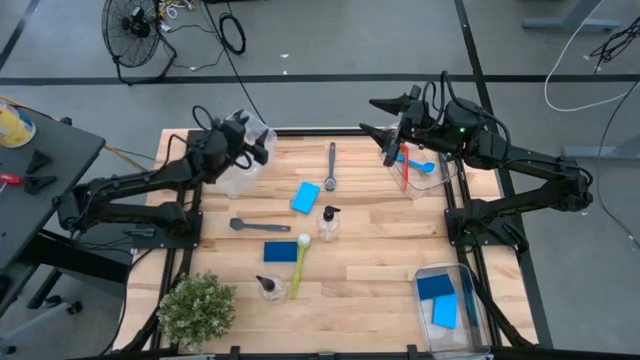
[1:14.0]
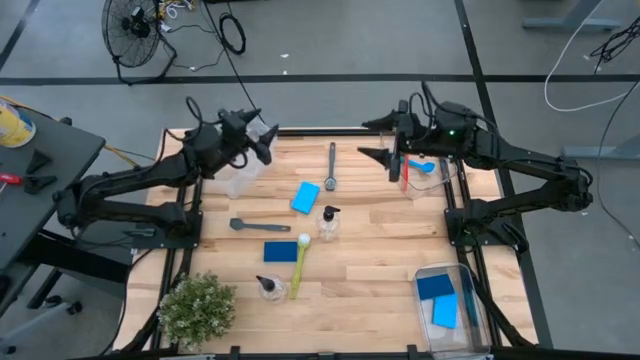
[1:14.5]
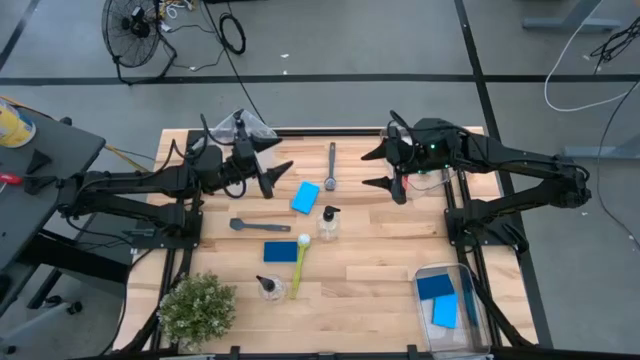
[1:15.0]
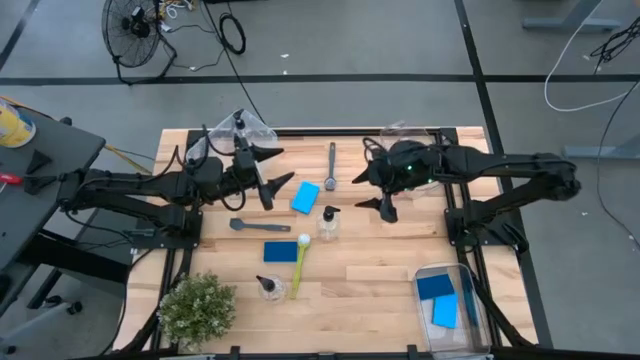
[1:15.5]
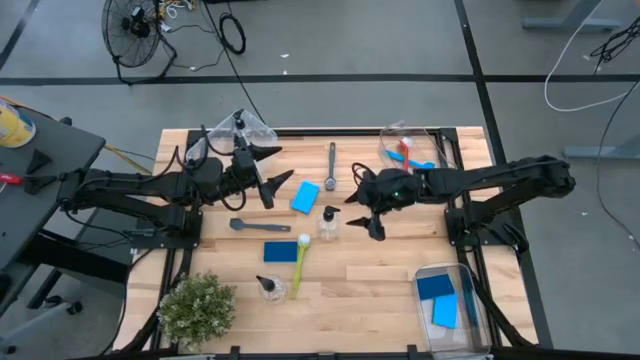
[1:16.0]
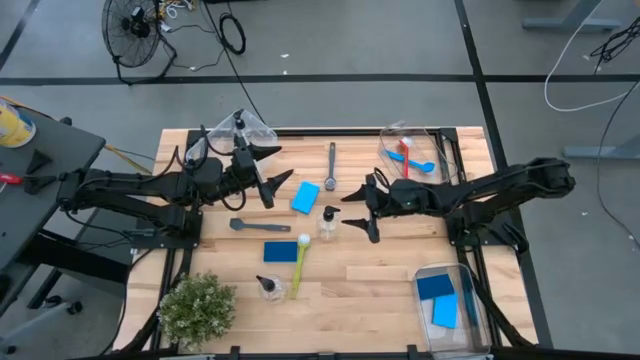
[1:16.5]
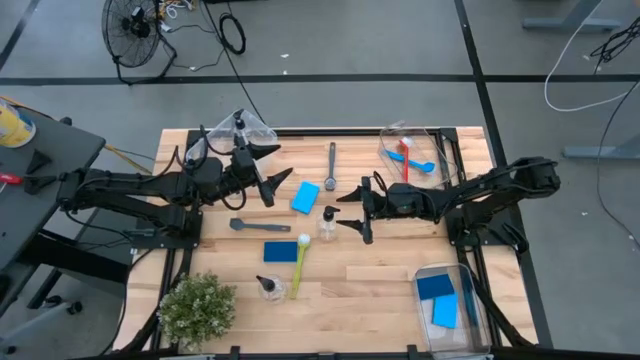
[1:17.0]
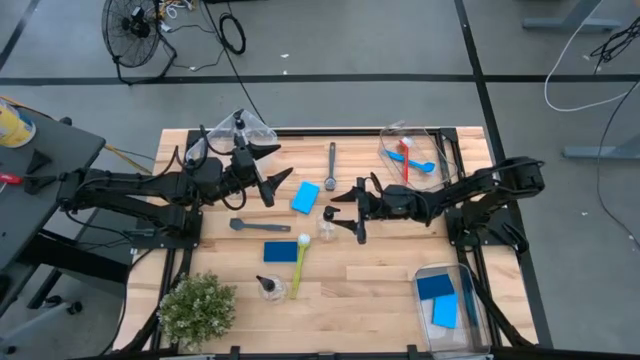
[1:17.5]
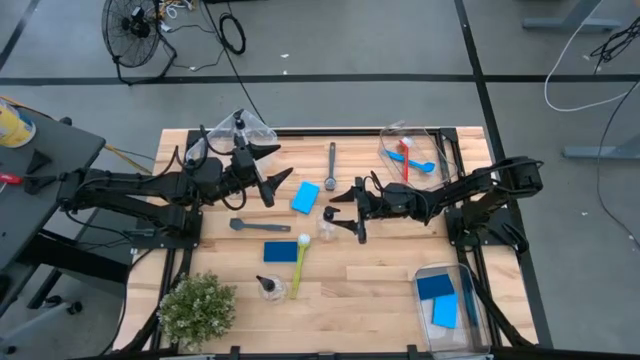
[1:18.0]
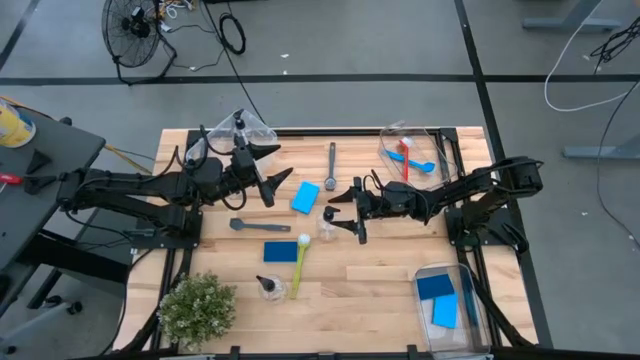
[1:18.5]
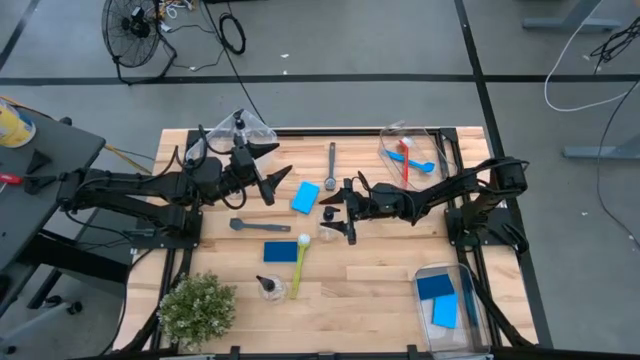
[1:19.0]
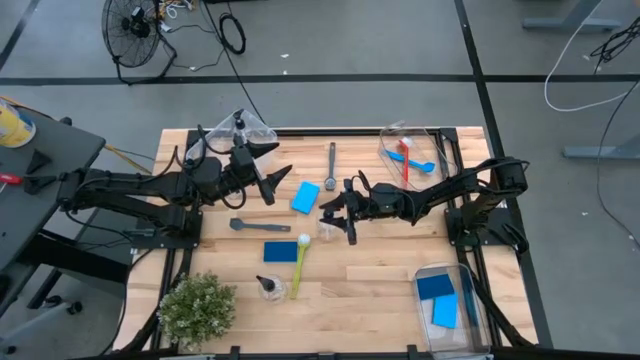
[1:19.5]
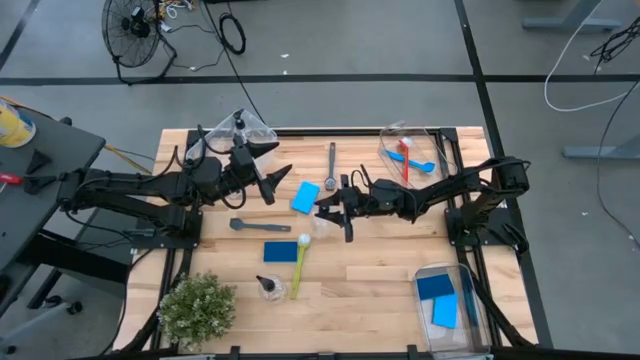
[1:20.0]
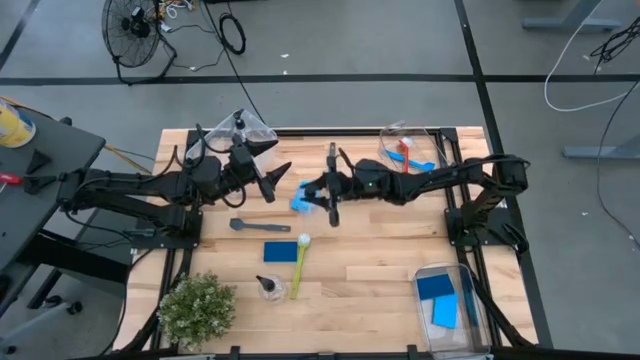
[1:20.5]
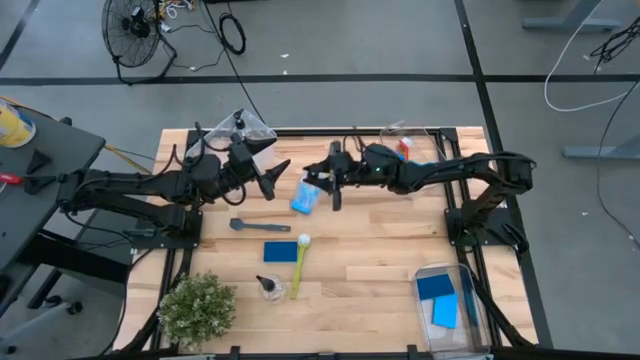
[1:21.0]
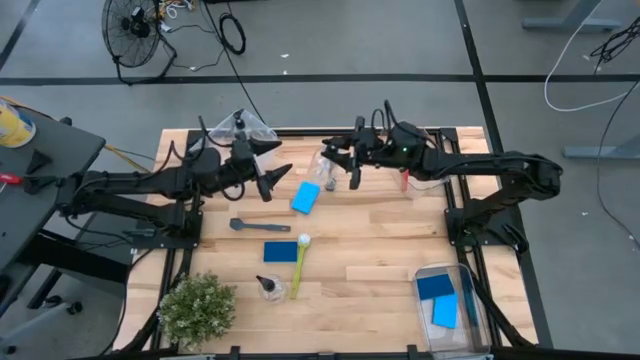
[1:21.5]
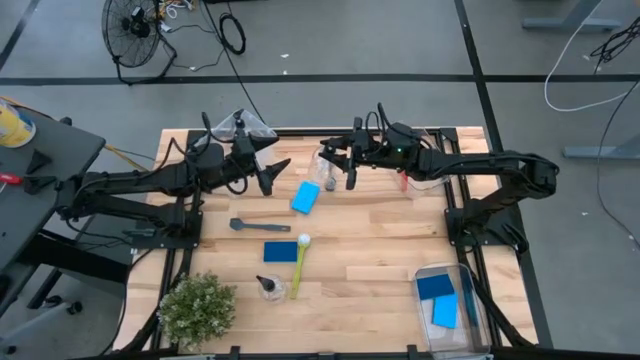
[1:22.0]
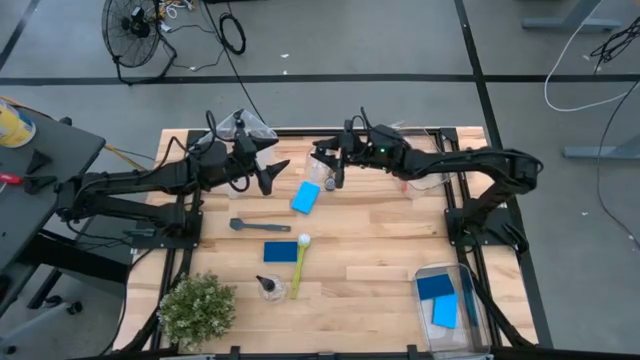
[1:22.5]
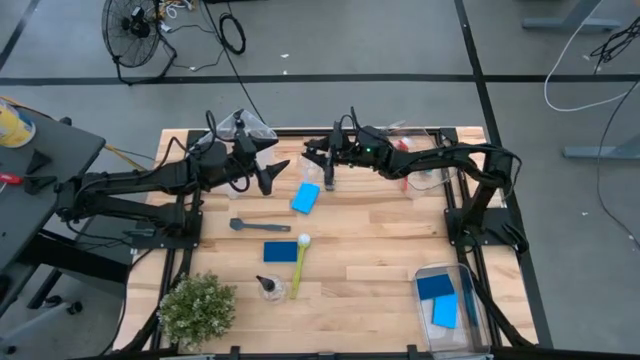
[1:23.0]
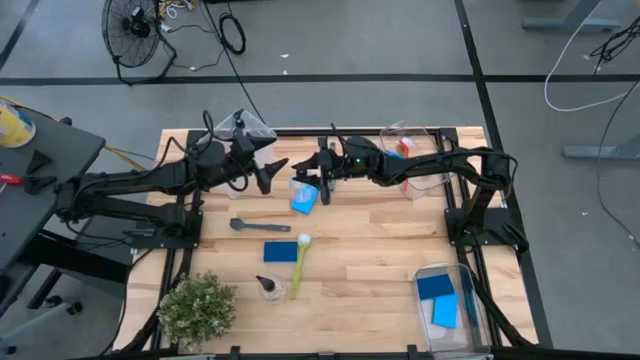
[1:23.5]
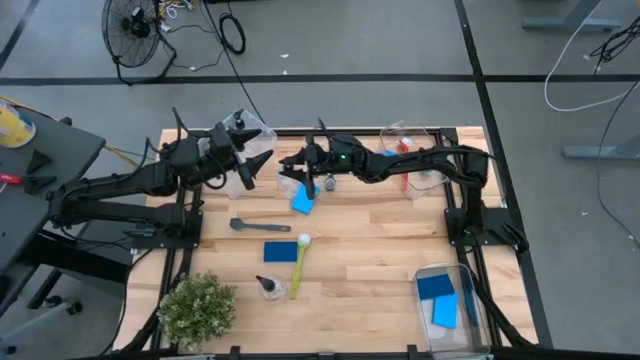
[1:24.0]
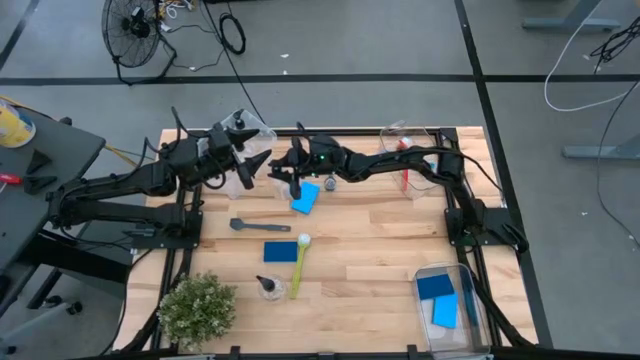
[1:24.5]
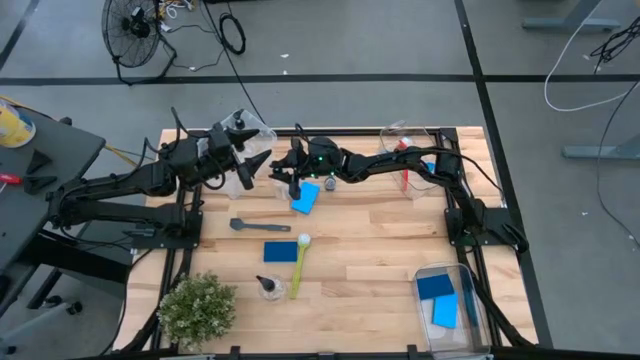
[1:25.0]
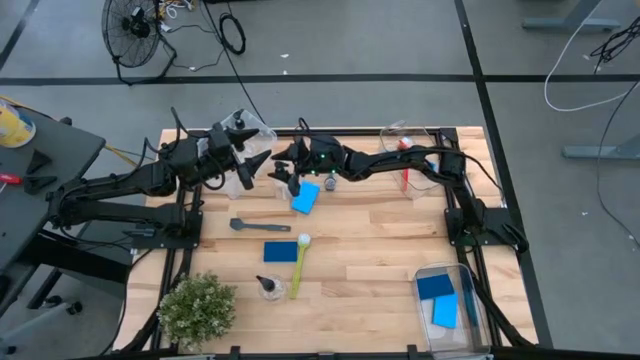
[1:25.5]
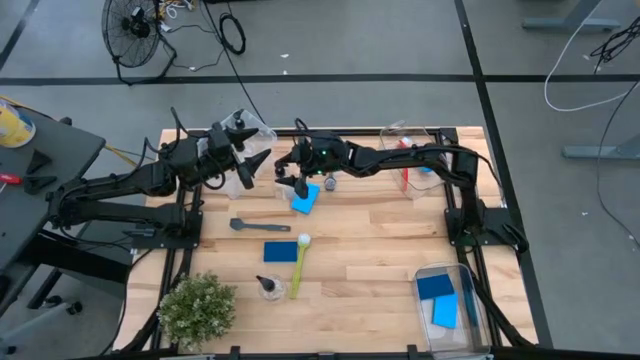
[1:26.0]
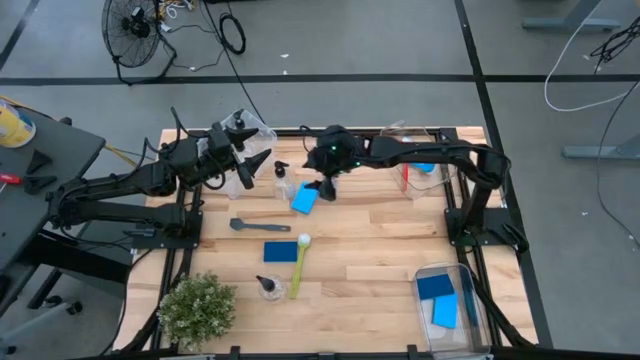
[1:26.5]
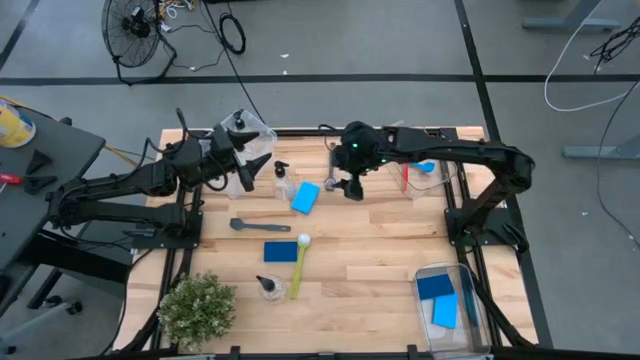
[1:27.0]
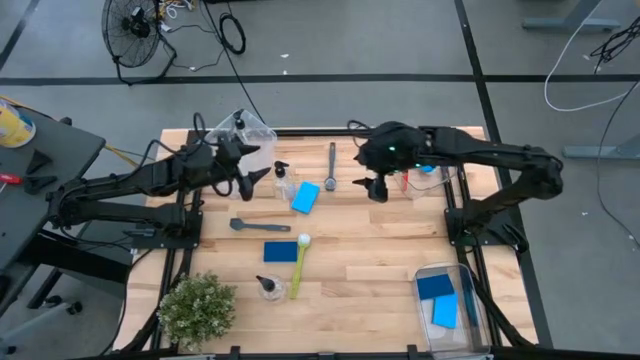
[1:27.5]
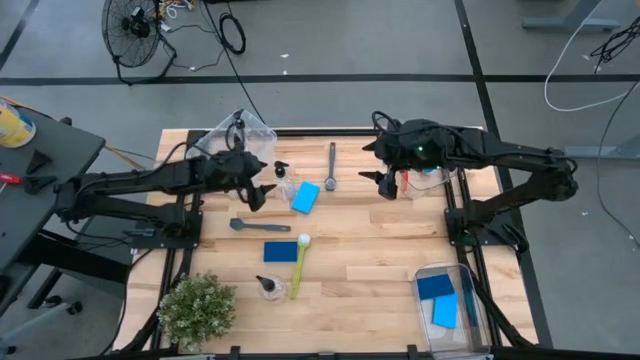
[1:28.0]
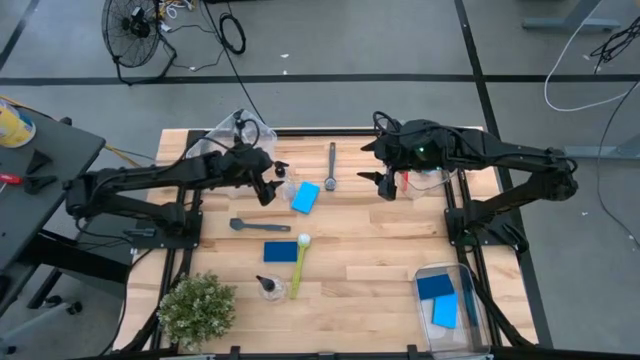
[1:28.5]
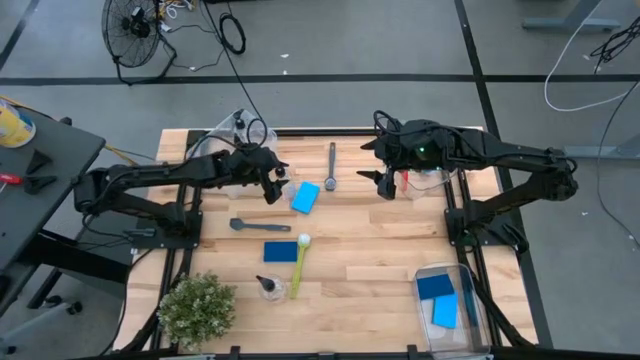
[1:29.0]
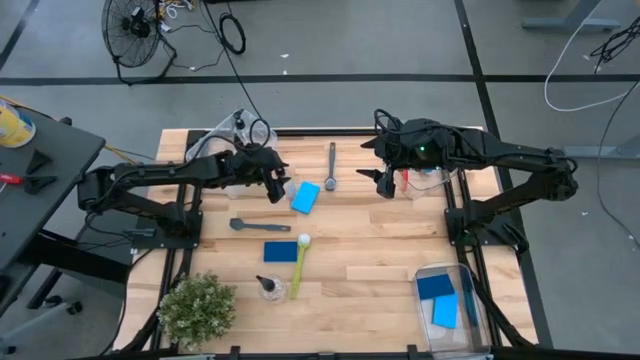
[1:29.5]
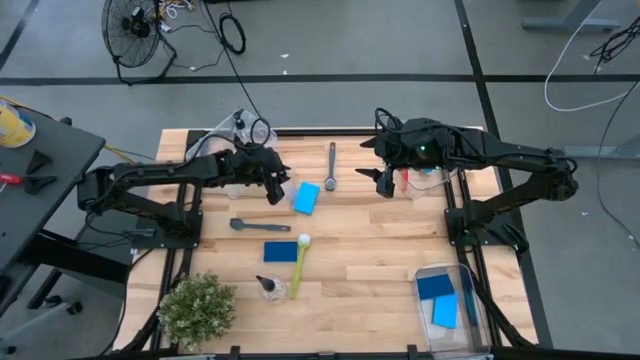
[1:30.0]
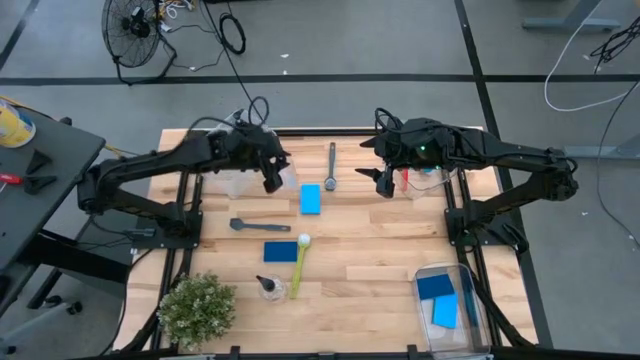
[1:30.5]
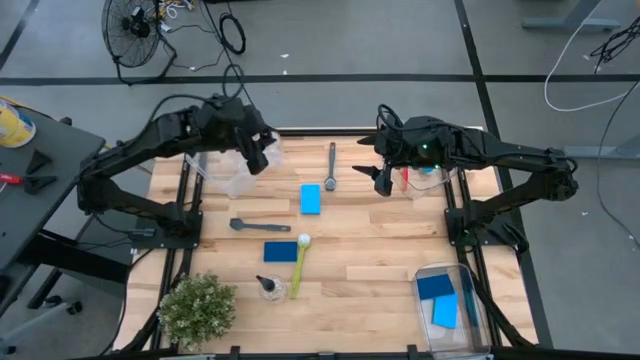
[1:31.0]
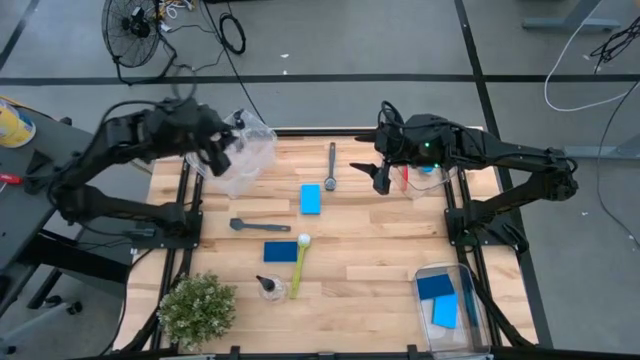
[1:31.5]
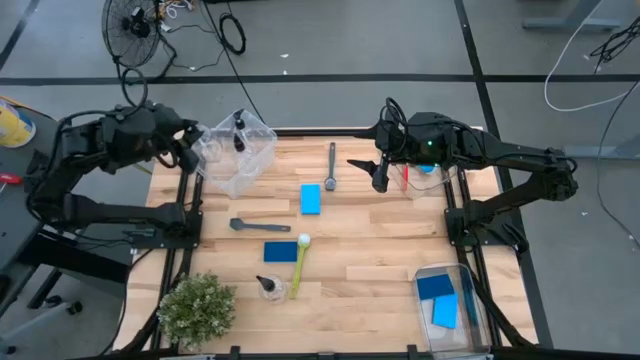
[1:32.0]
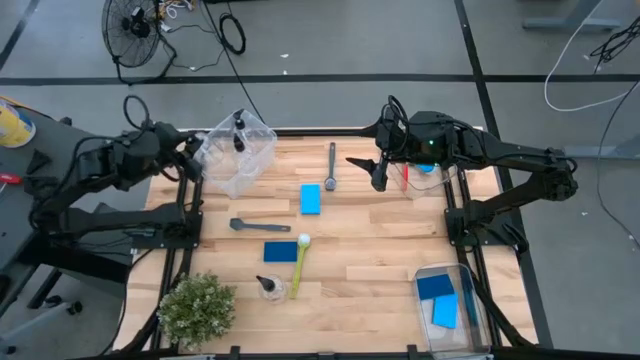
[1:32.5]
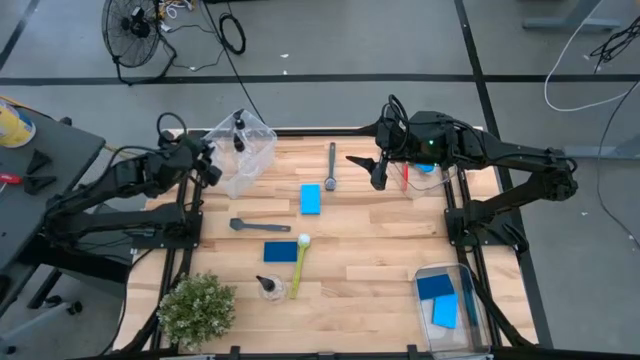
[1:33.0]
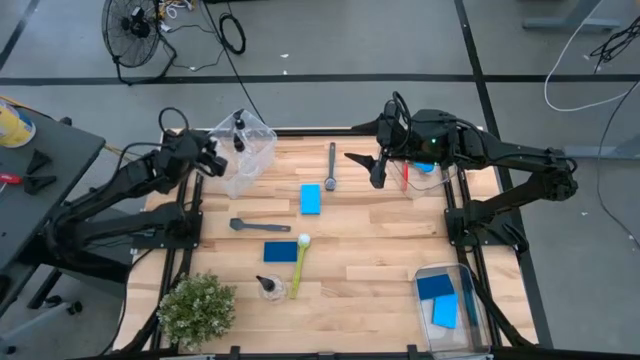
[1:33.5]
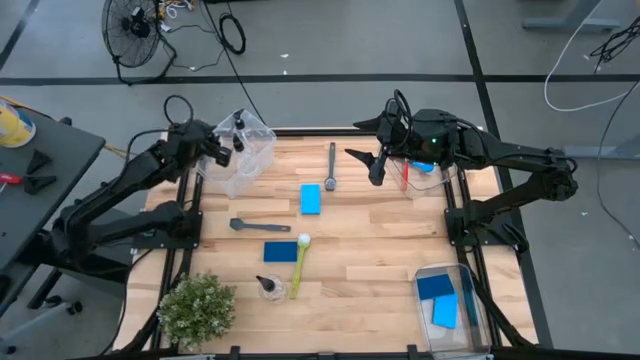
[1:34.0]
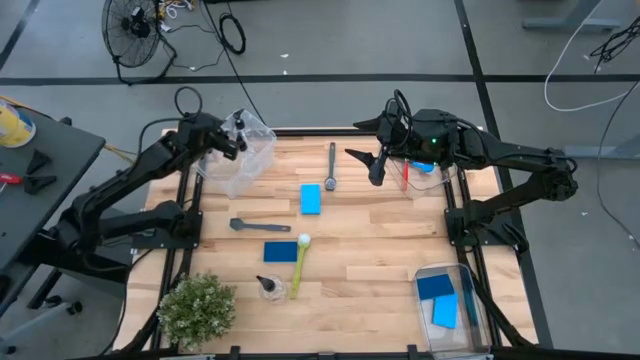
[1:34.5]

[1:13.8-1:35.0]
Task: Pick & Place Kitchen Sink Supplies
Put the transparent bottle spray into the transparent container
